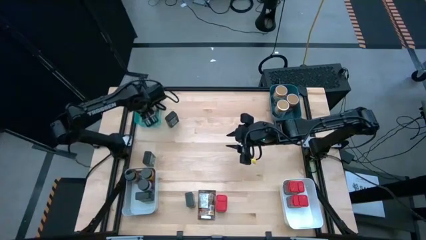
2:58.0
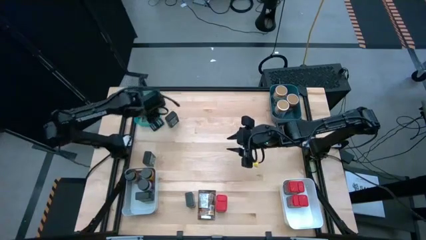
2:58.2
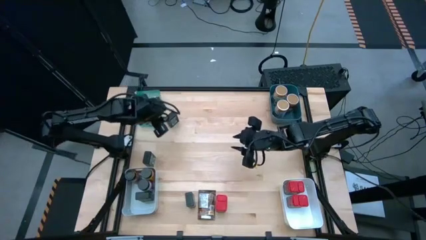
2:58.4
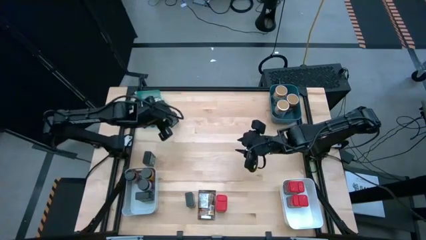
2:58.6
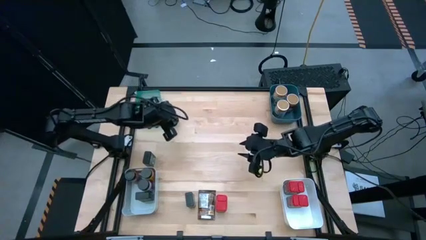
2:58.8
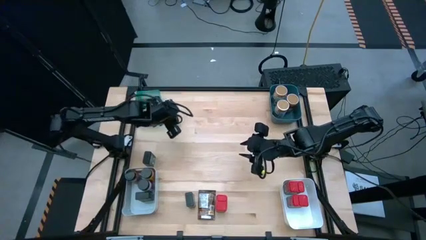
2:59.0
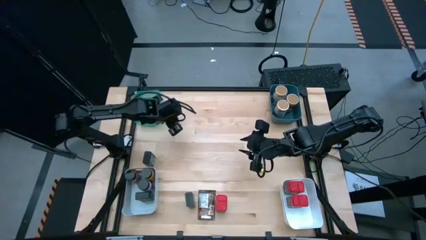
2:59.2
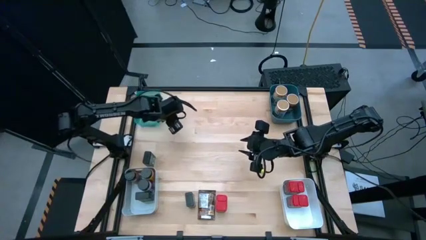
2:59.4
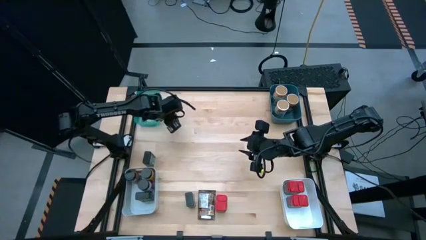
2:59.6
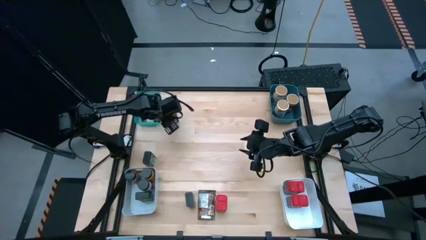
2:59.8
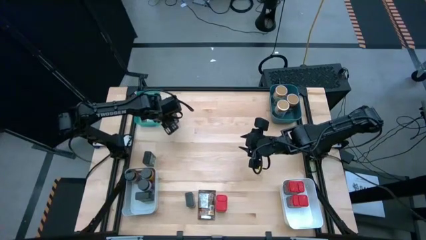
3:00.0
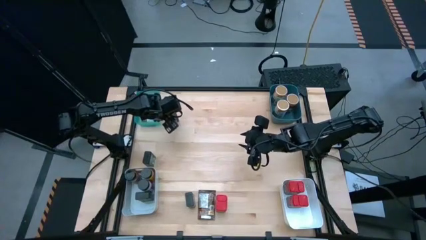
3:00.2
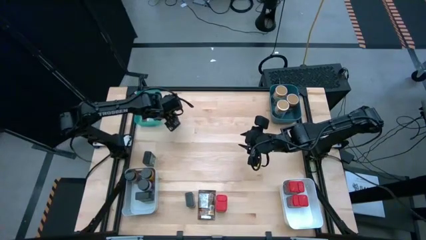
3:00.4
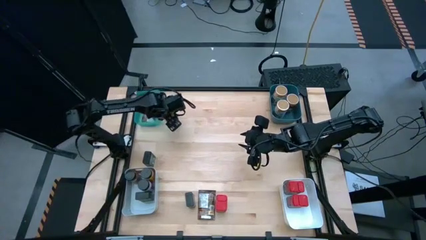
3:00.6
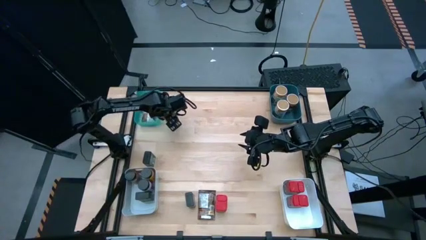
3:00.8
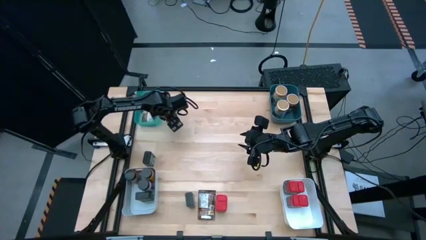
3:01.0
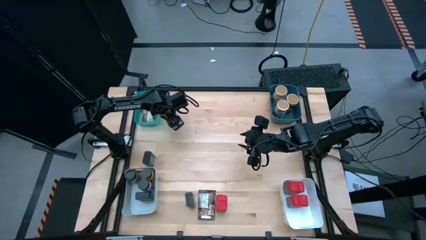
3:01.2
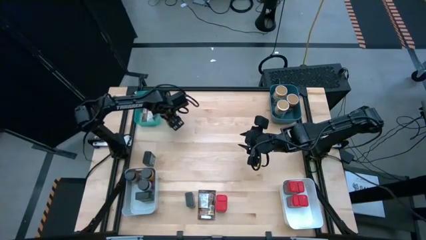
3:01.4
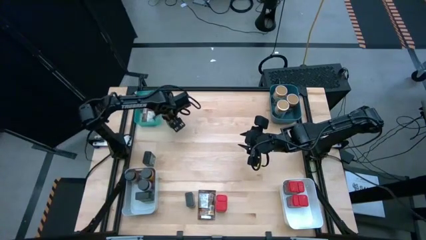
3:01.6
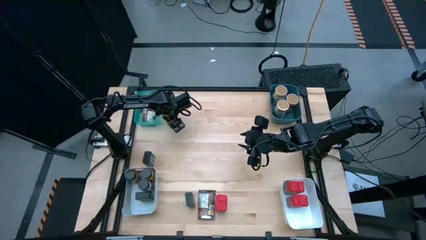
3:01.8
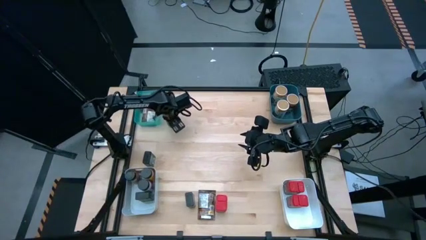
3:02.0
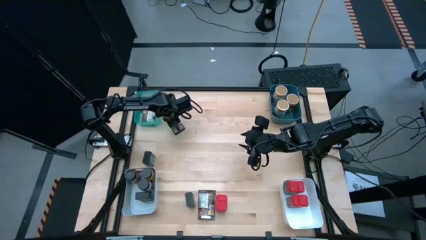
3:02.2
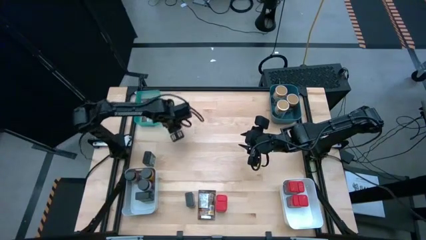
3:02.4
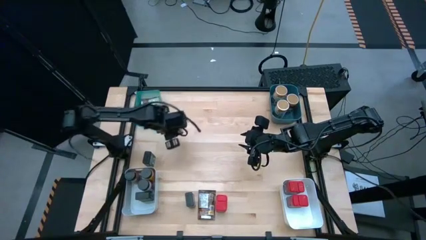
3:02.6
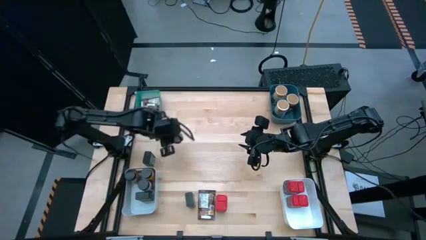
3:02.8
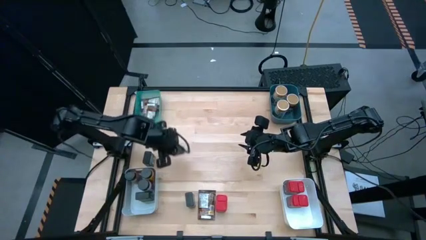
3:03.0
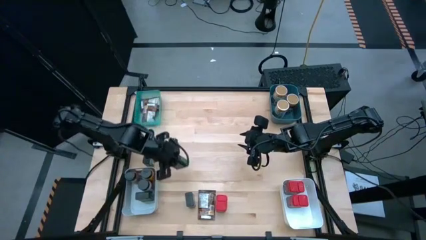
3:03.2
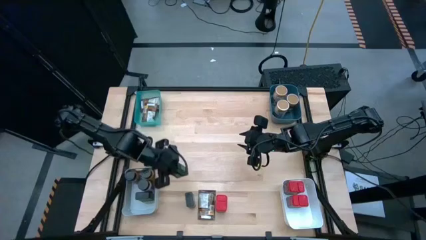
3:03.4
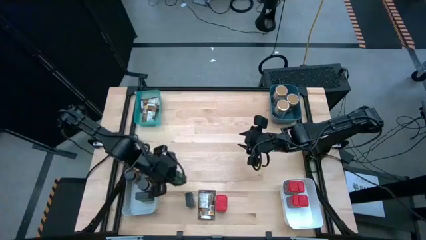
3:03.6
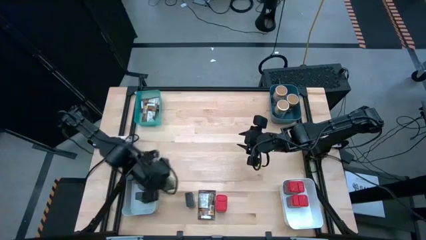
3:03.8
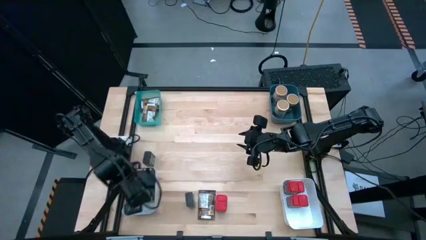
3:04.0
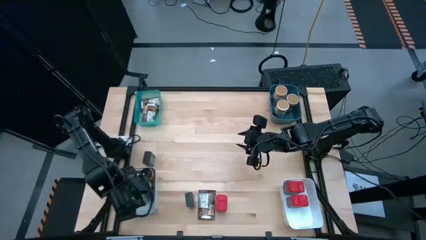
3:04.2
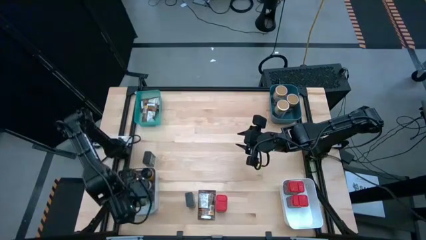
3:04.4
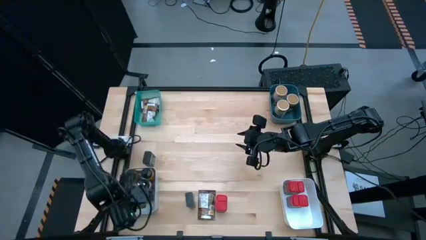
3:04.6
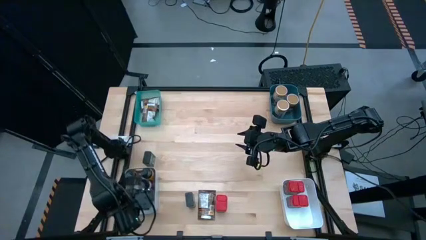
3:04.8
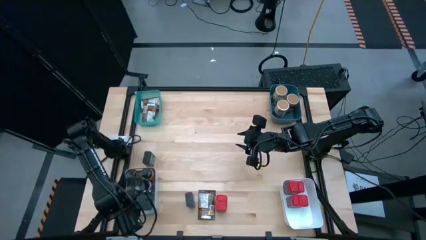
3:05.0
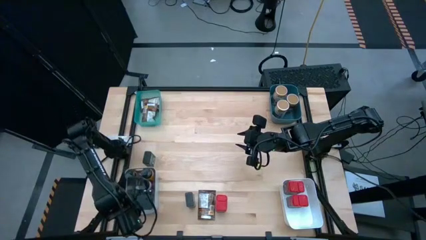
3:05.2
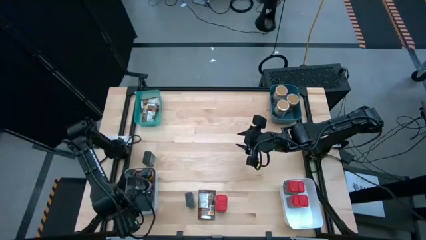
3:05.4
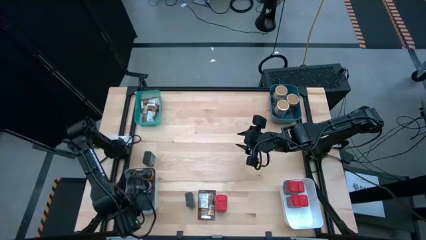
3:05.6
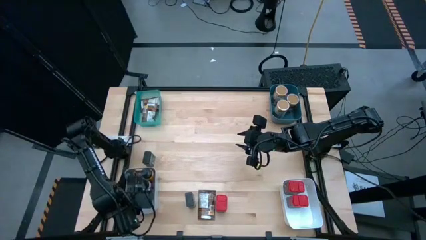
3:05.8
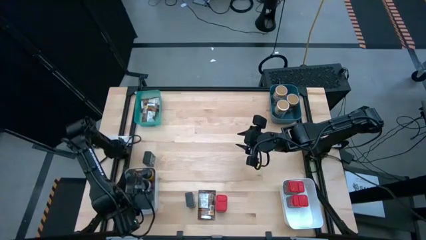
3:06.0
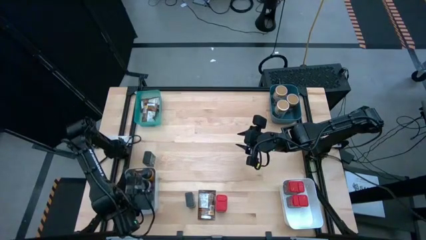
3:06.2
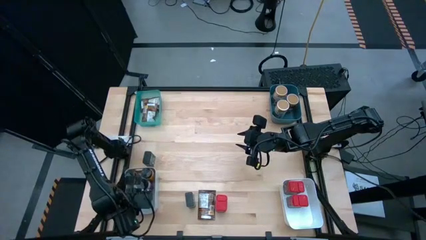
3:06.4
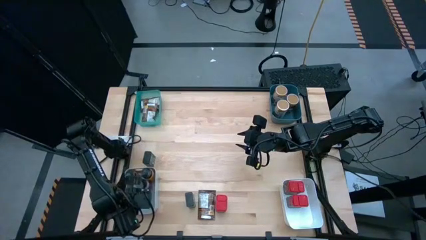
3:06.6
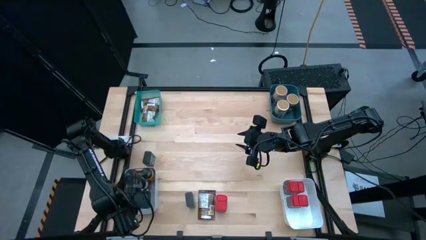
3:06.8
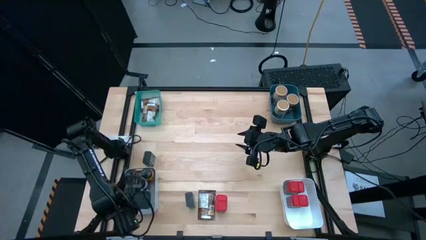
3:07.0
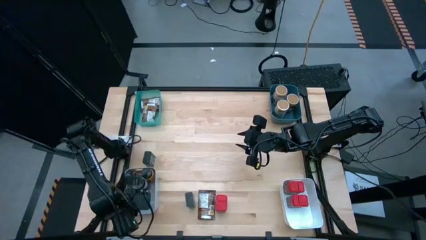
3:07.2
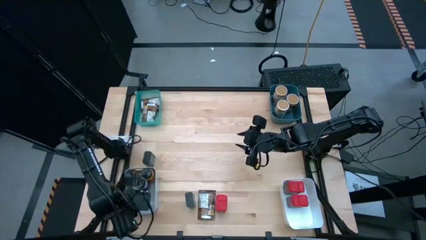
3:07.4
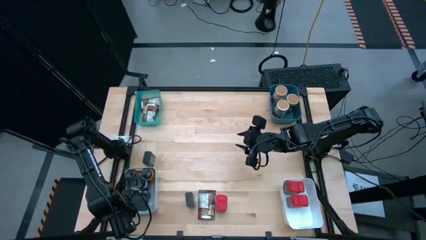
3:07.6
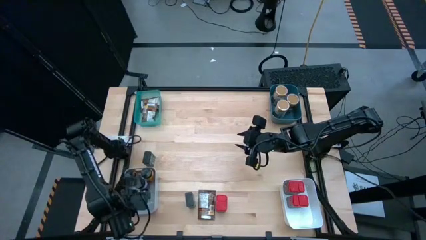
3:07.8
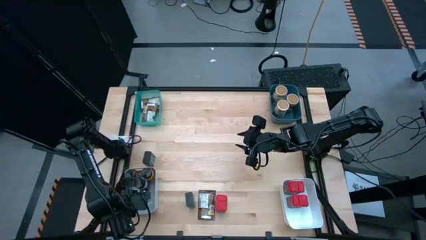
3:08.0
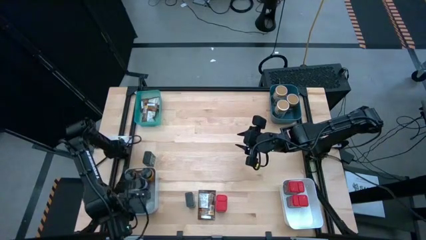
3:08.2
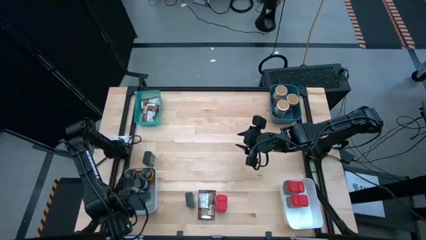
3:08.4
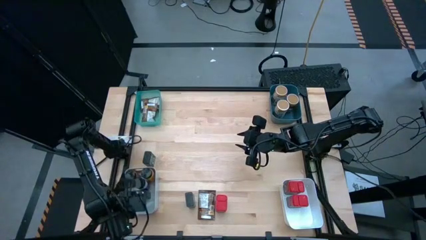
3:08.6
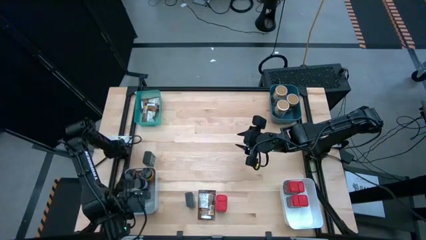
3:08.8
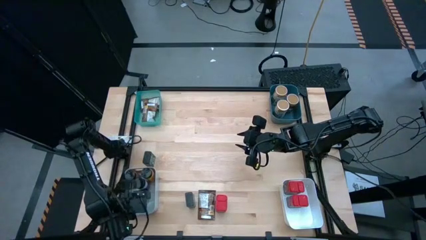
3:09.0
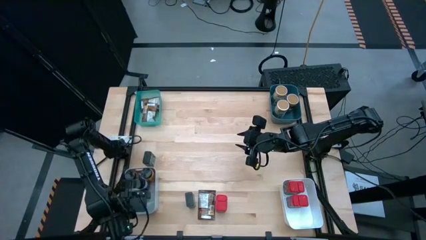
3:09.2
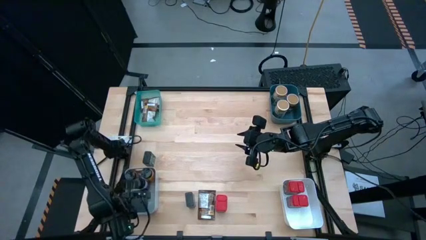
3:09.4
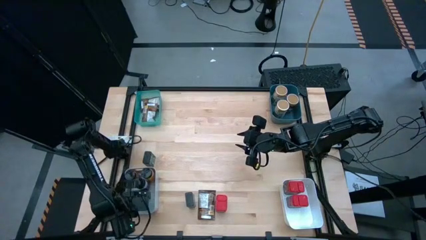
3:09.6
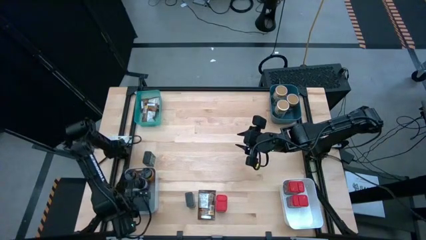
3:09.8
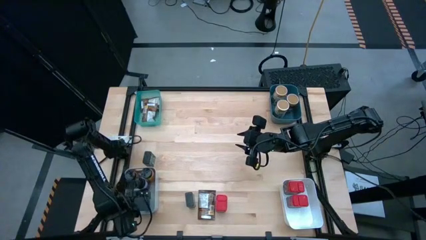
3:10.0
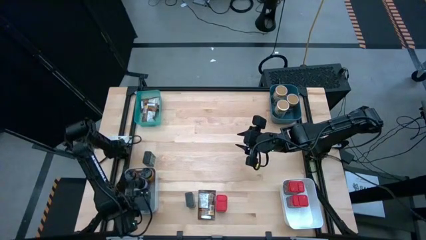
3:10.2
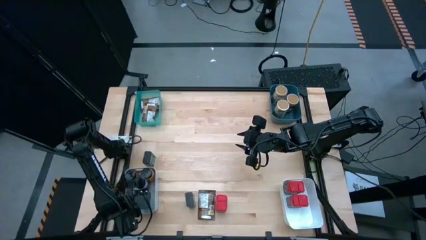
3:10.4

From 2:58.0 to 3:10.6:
Task: Sort spices by type
Put the top black seasoning can into the gray bin

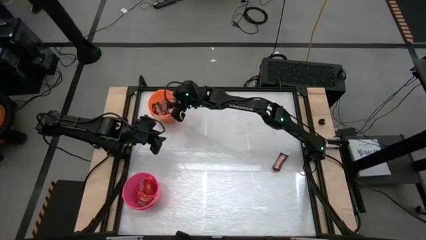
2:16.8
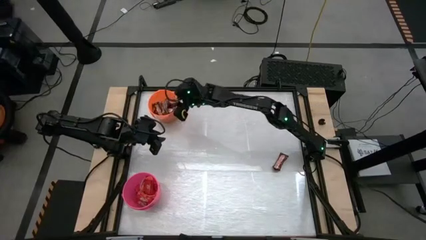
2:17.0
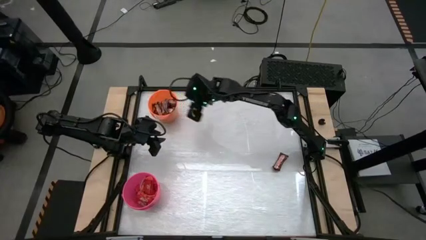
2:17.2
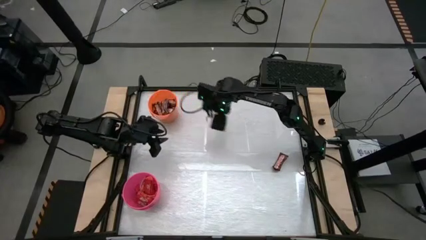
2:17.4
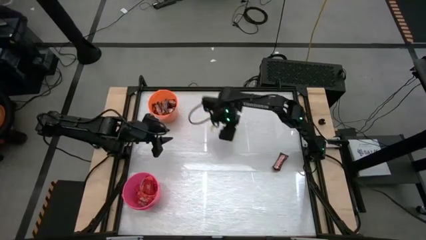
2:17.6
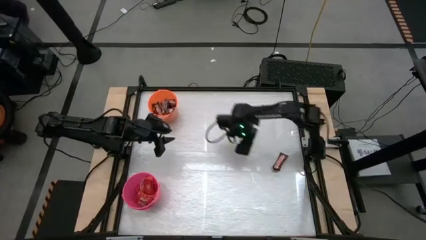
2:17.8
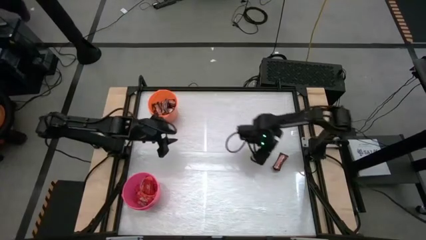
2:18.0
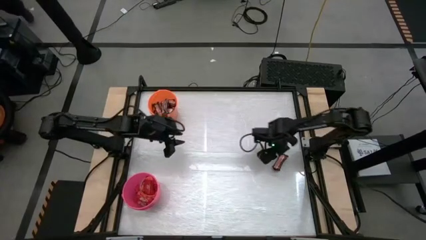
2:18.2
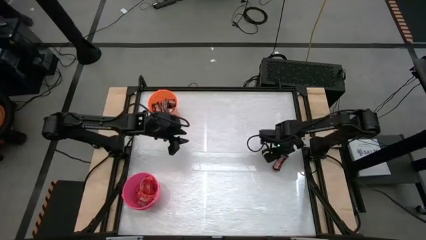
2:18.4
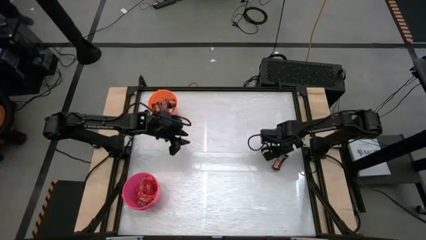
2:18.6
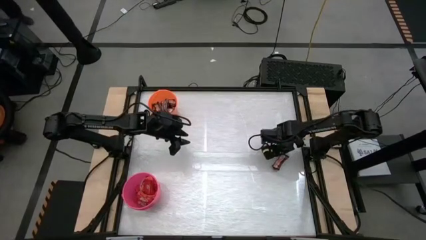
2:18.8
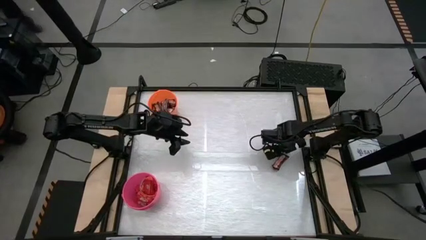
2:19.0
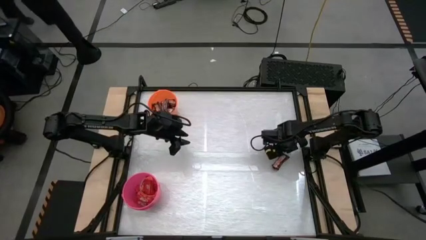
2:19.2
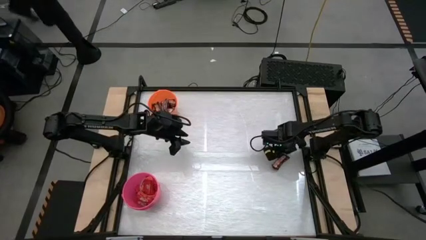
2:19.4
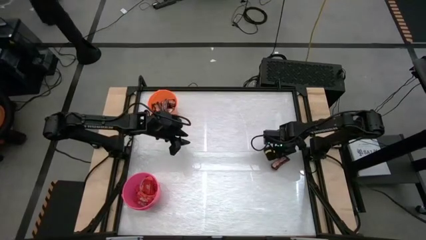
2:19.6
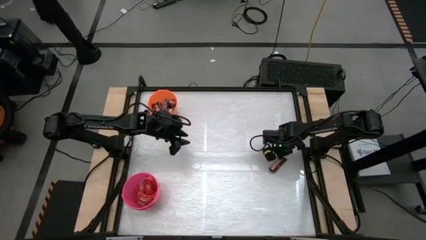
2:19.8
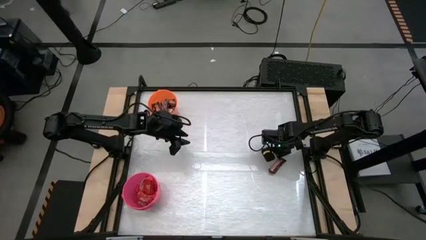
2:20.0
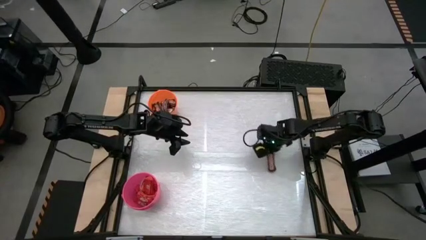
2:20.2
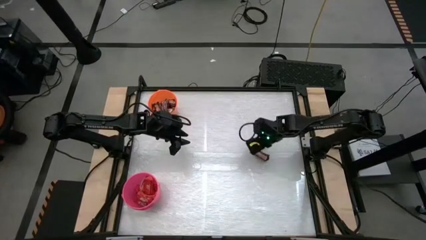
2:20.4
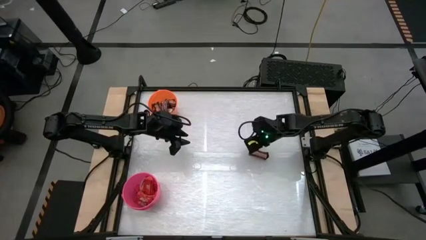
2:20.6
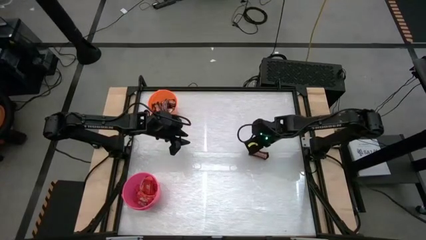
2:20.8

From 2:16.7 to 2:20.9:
Task: Sort candy by brand, put in halloween buckets
Put the brown chocolate bar into the orange bucket

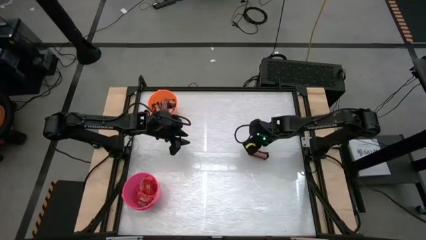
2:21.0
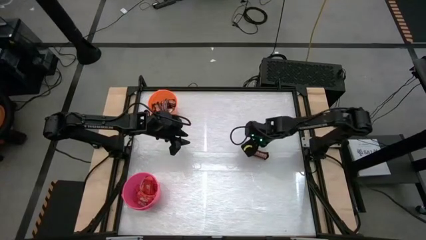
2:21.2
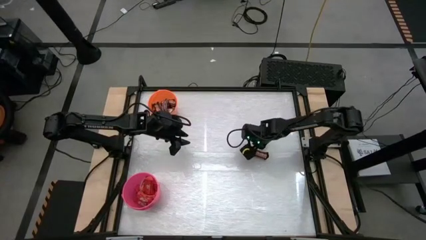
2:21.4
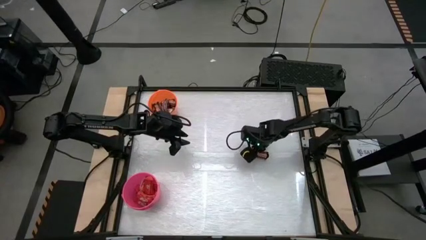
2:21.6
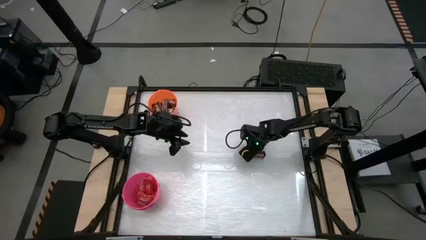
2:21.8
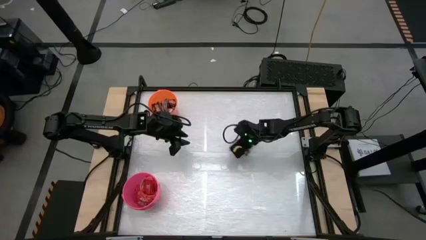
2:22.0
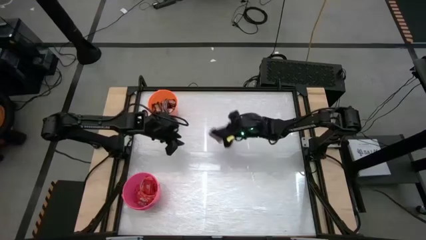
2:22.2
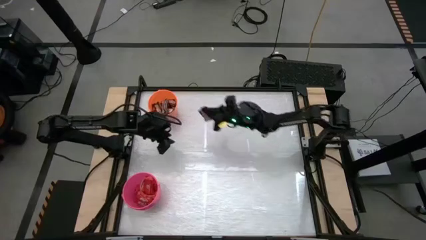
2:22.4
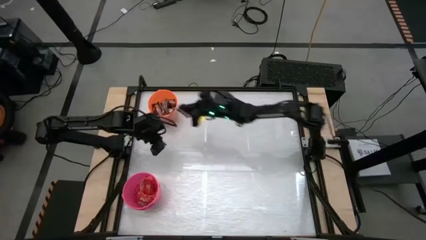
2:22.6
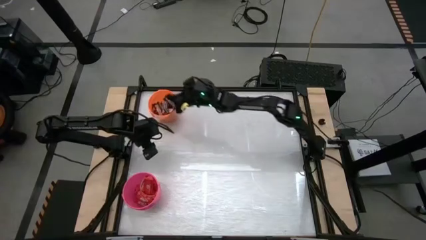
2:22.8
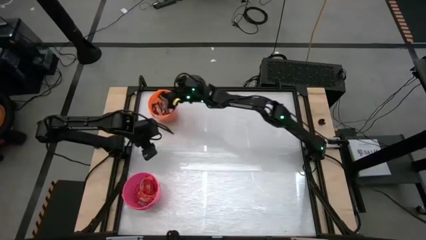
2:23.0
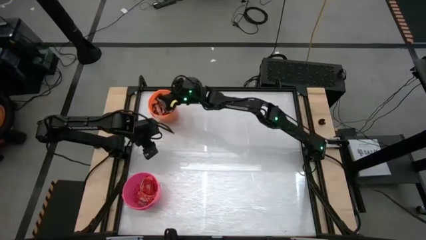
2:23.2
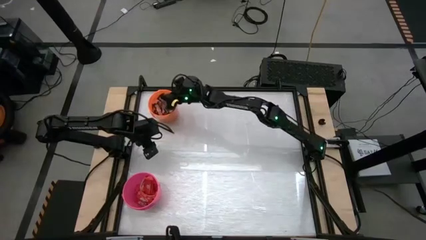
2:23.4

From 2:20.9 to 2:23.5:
Put the brown chocolate bar into the orange bucket
